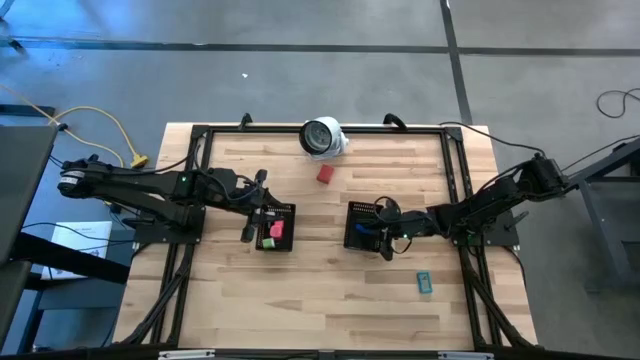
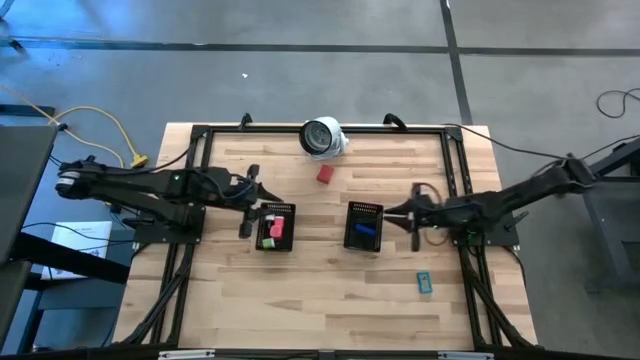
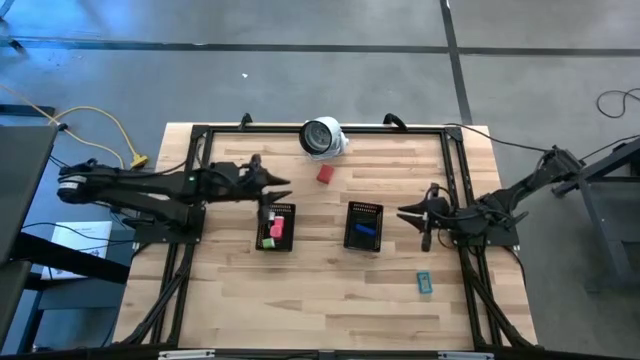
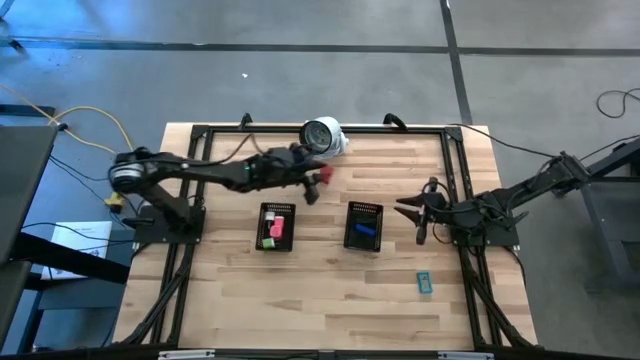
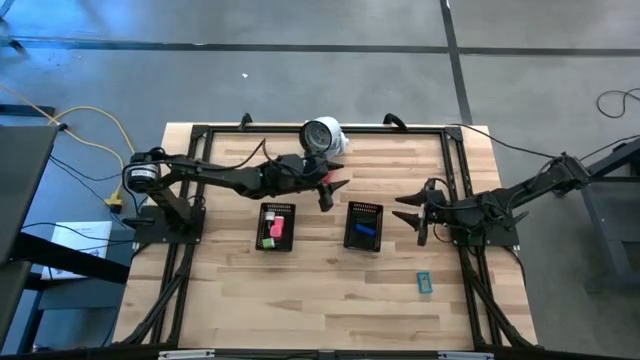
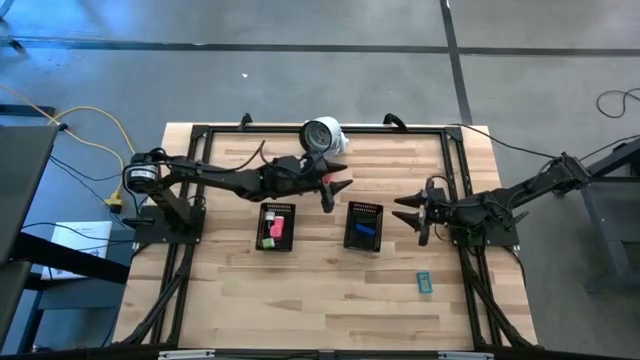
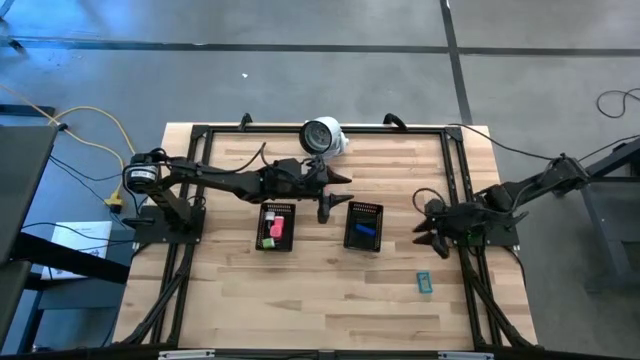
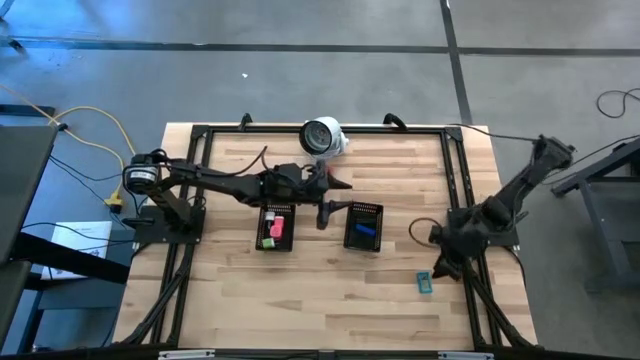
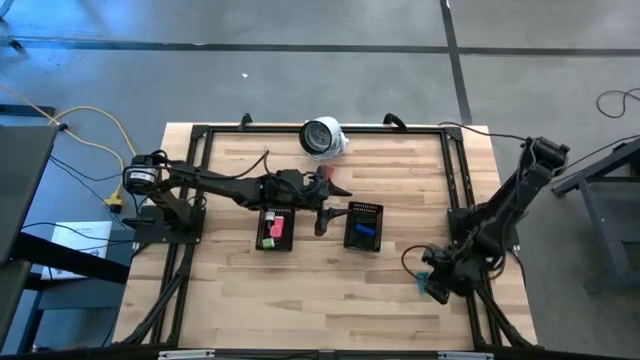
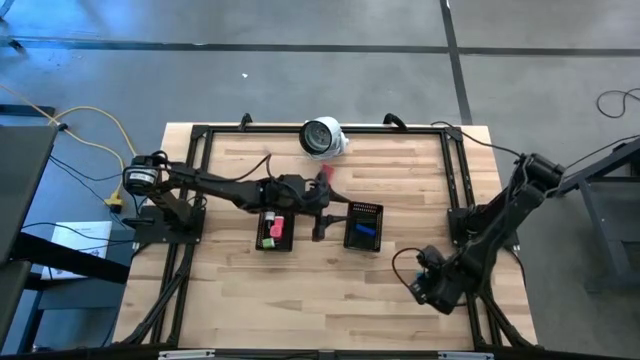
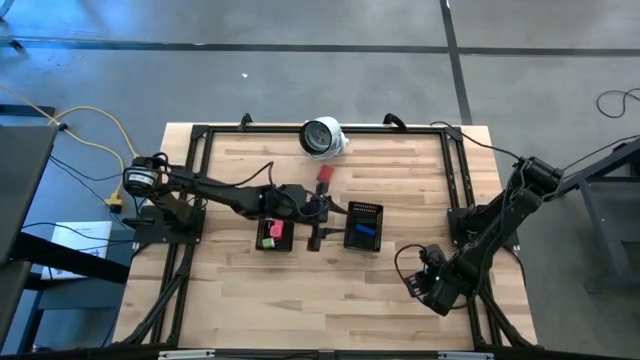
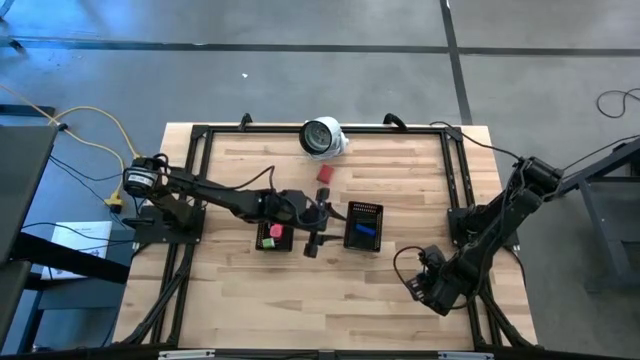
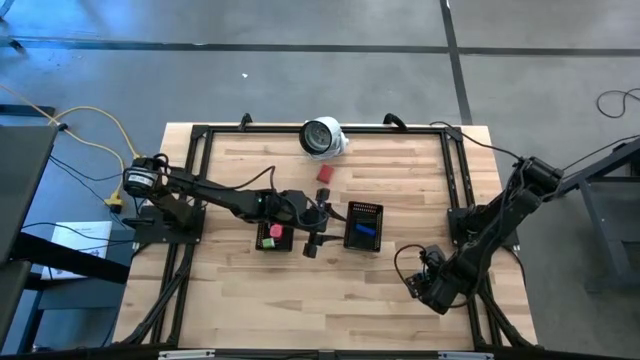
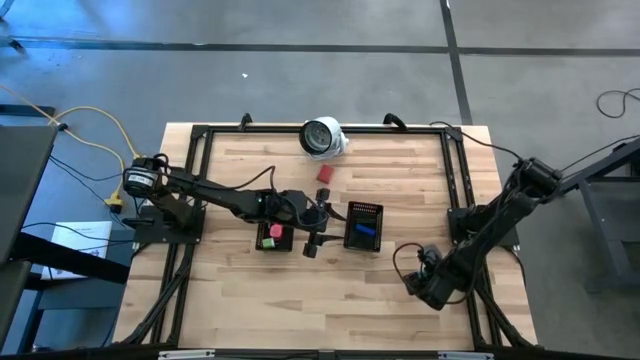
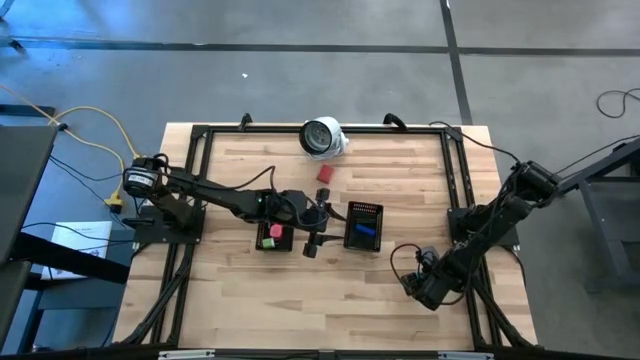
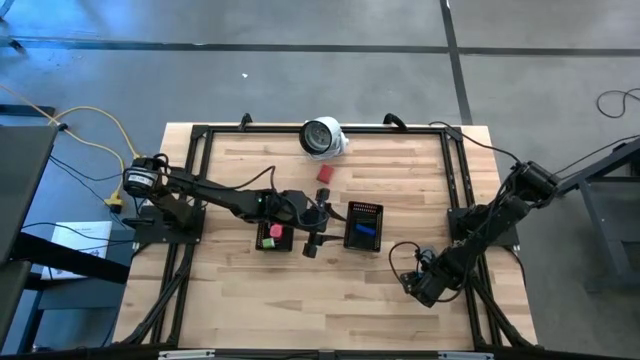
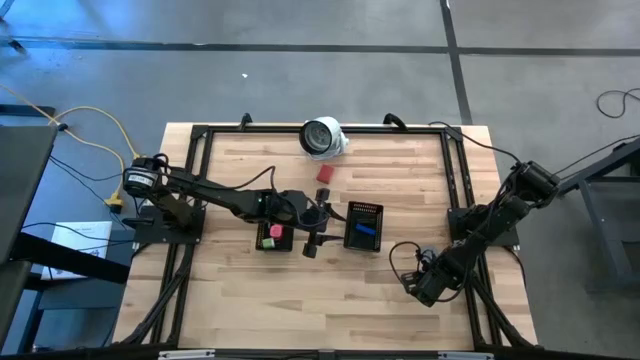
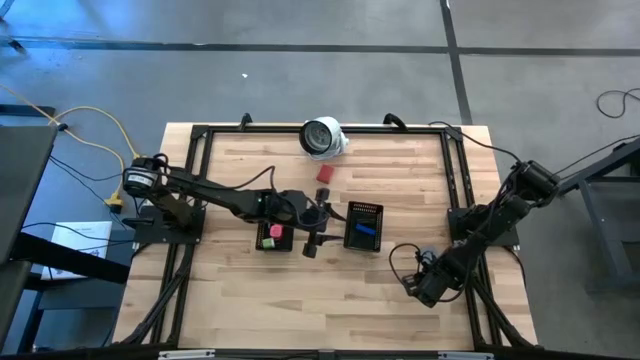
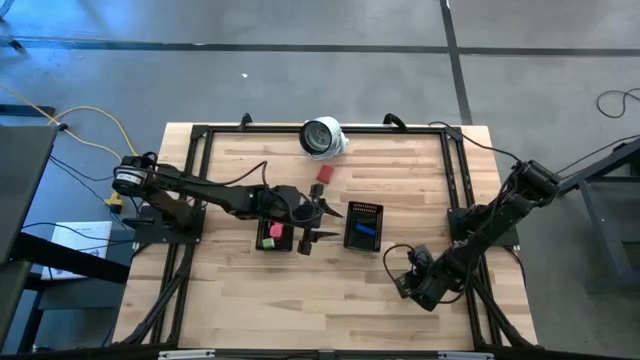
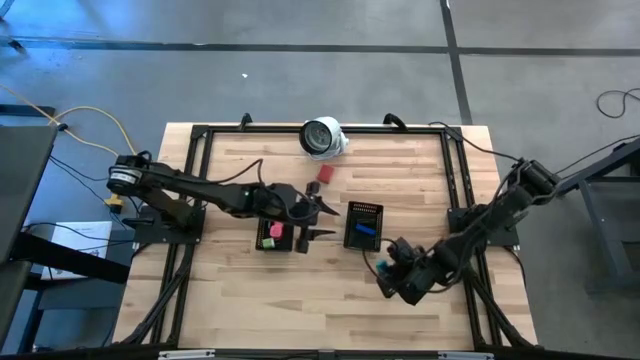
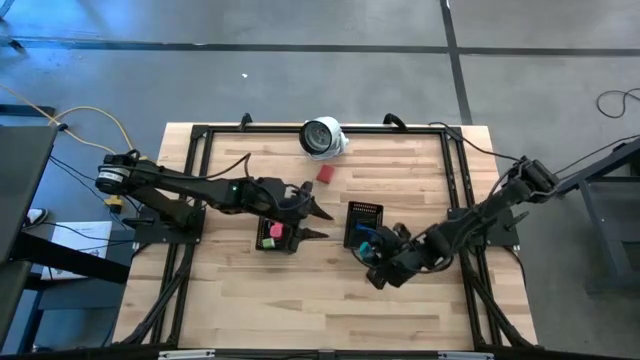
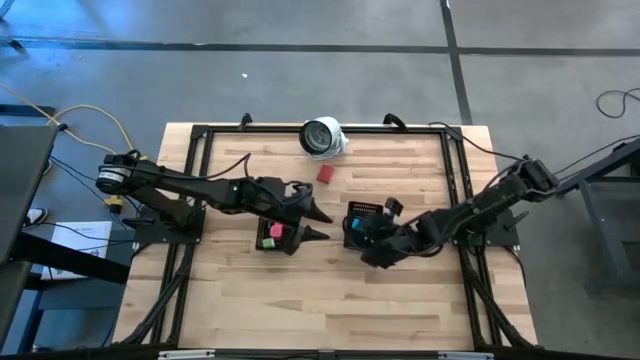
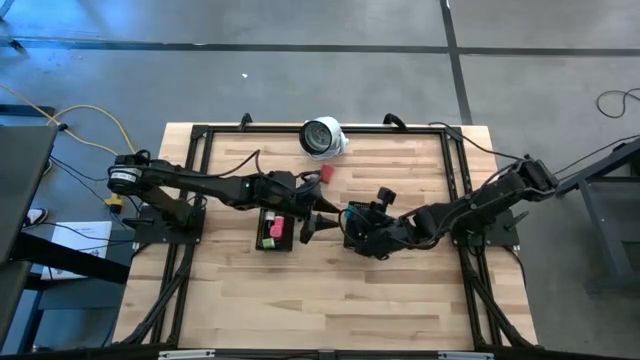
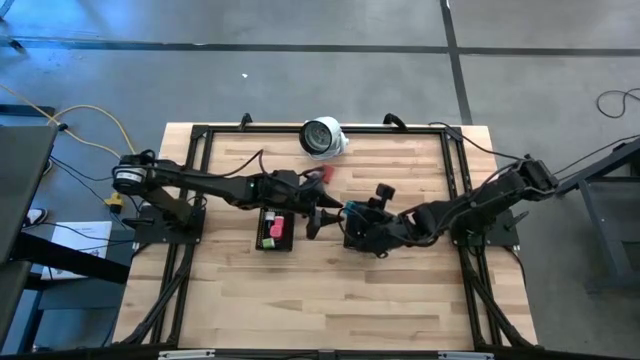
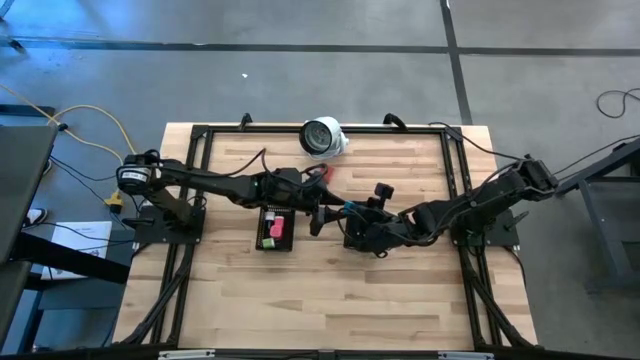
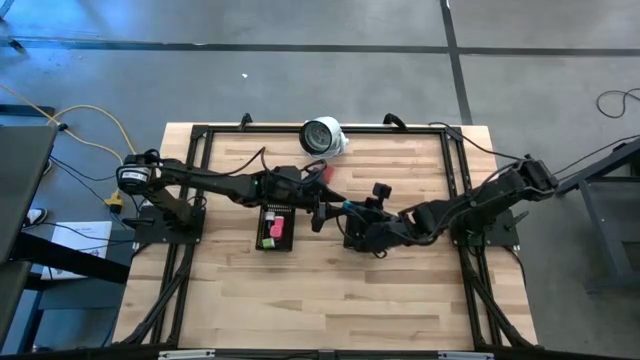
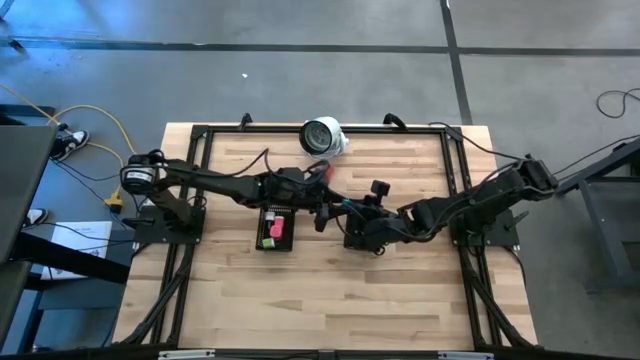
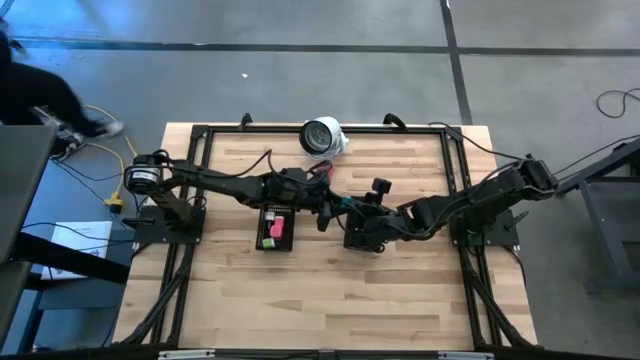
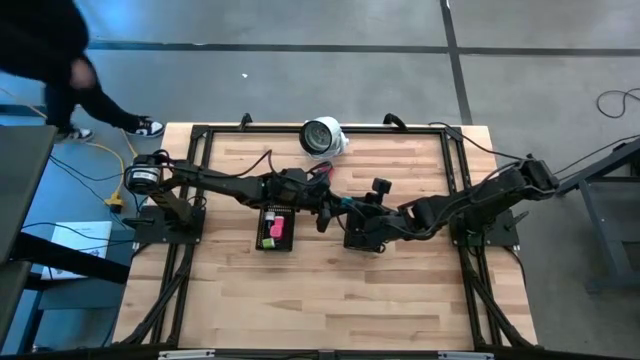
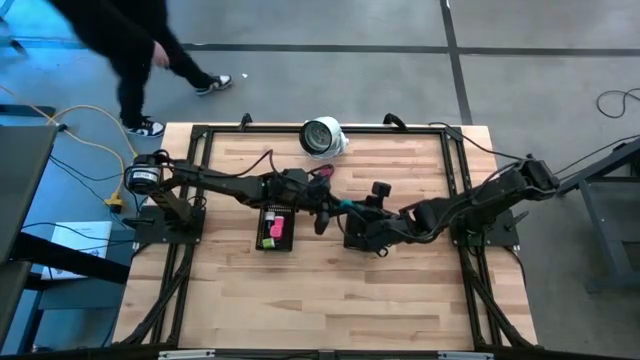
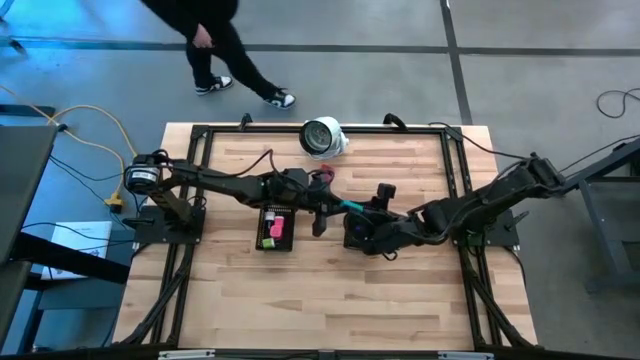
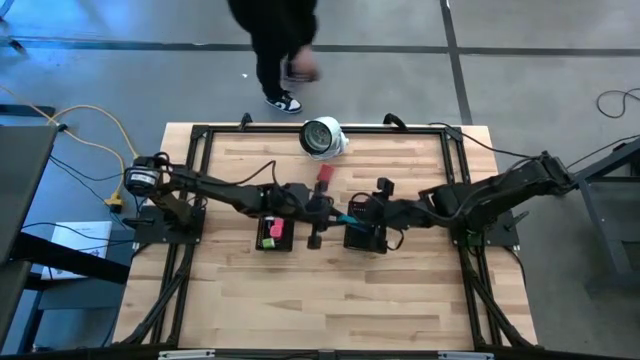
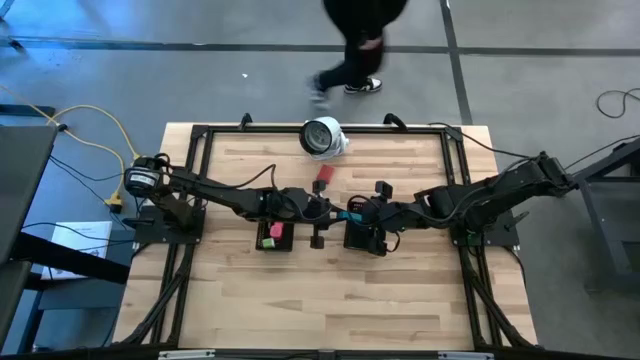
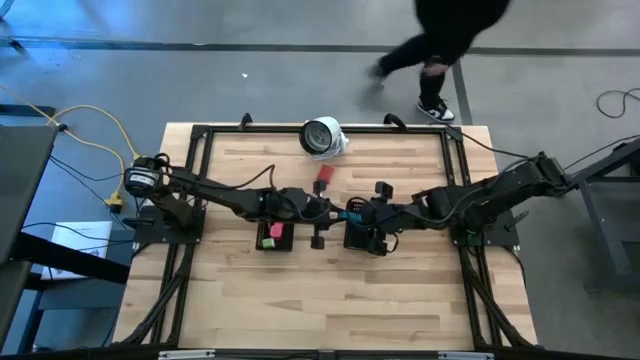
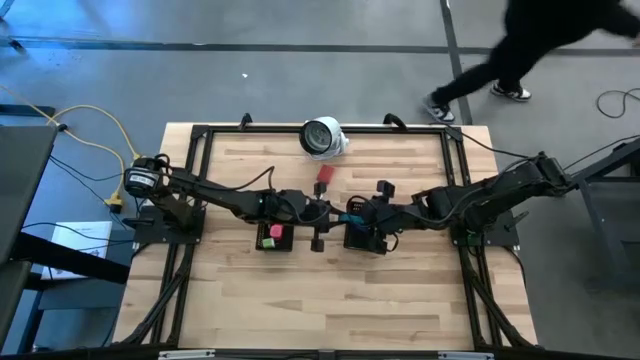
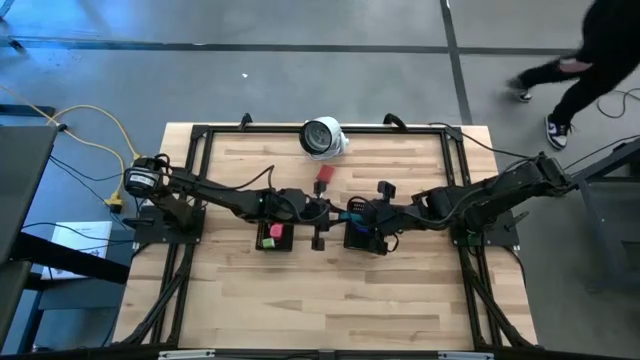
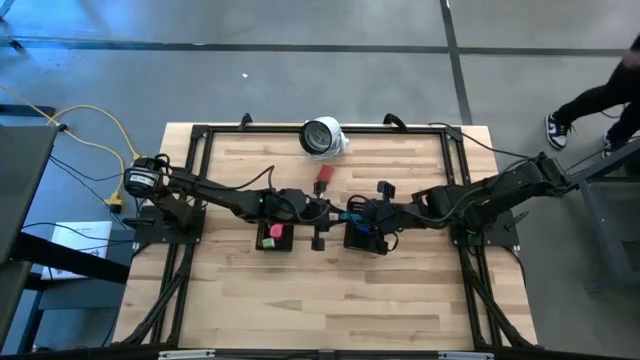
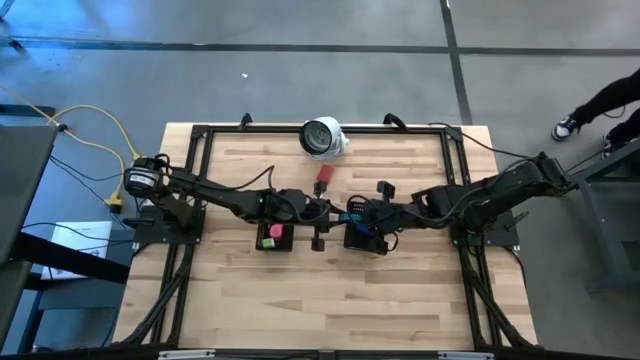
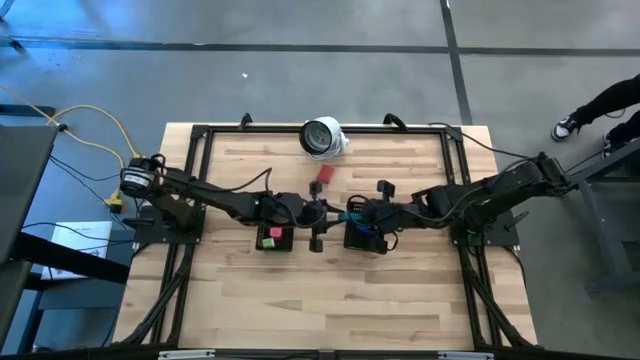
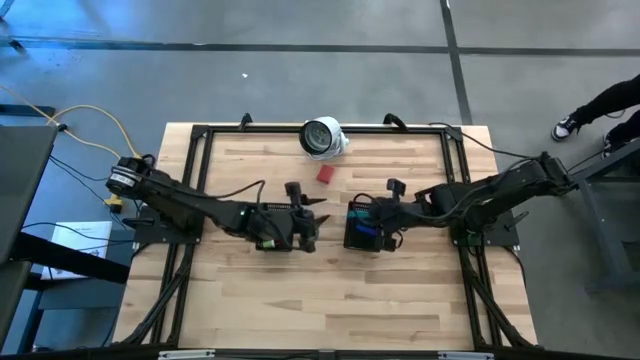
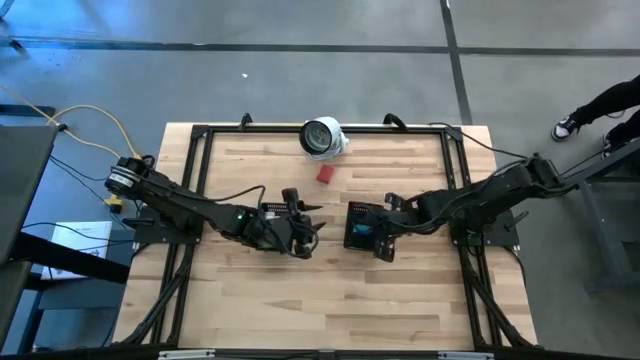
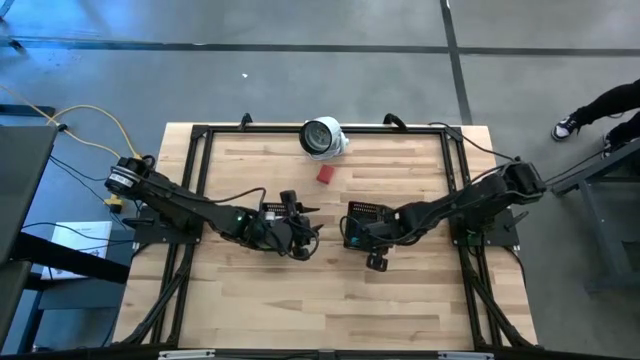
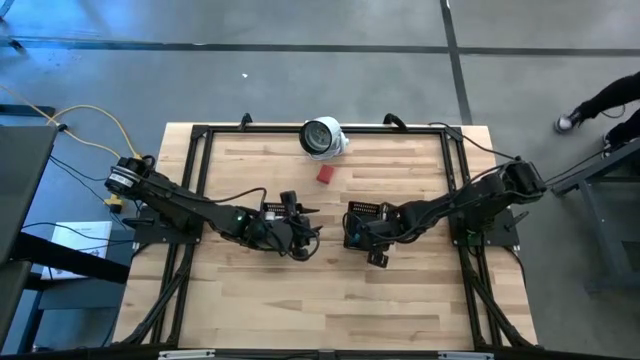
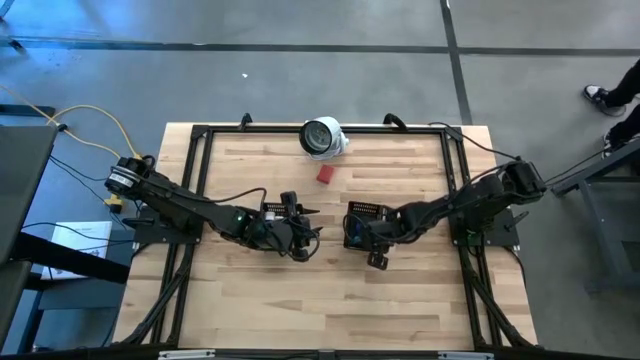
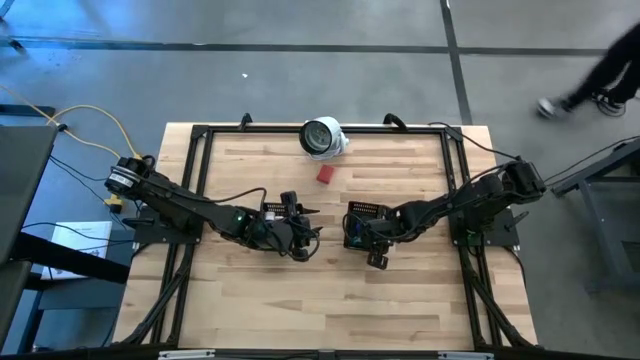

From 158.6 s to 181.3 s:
Task: Pick & Place Office items
Put the light blue digital clock into the right black bin
